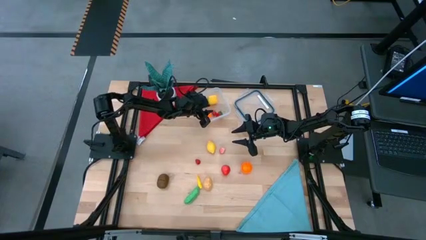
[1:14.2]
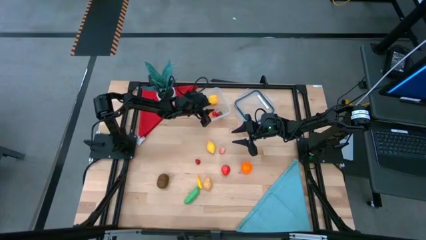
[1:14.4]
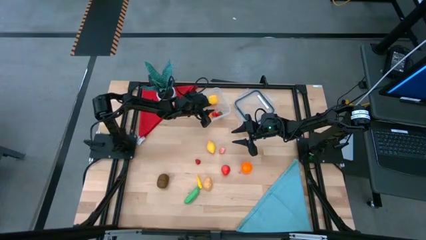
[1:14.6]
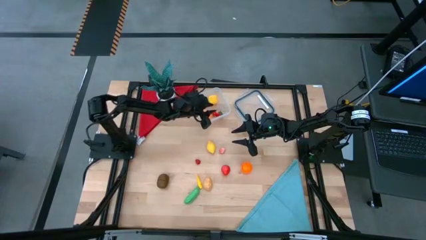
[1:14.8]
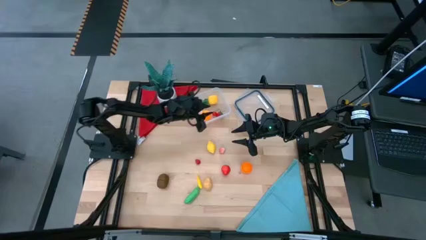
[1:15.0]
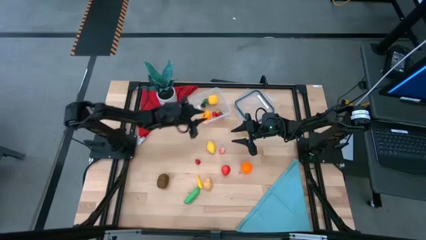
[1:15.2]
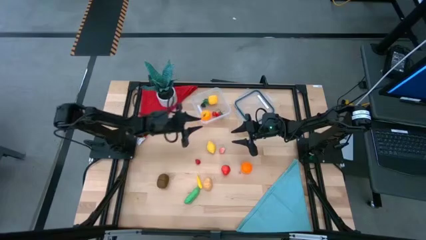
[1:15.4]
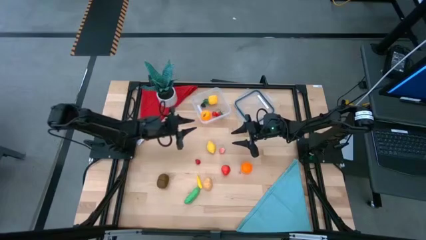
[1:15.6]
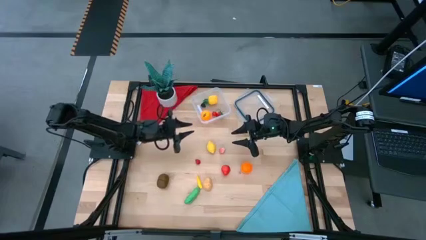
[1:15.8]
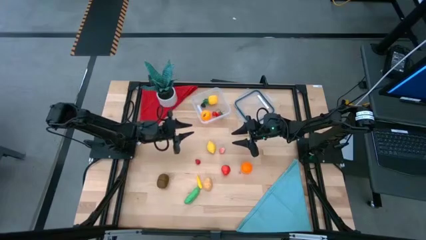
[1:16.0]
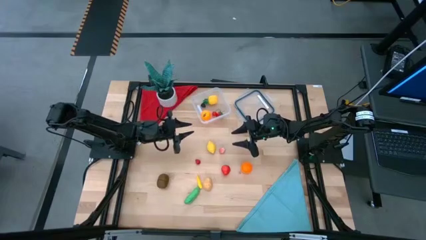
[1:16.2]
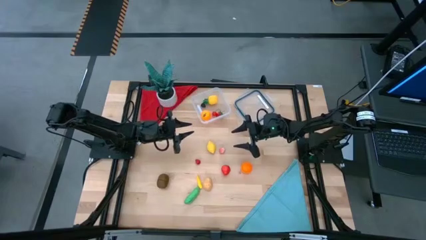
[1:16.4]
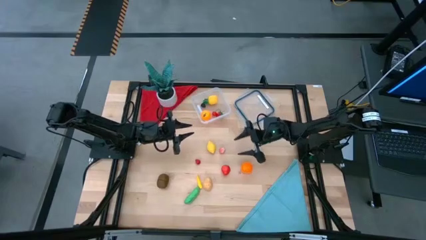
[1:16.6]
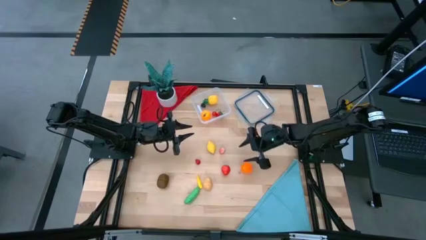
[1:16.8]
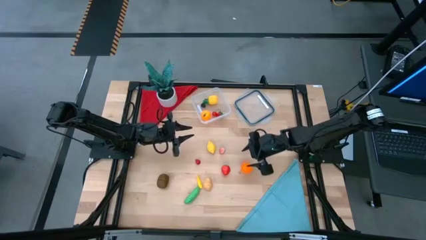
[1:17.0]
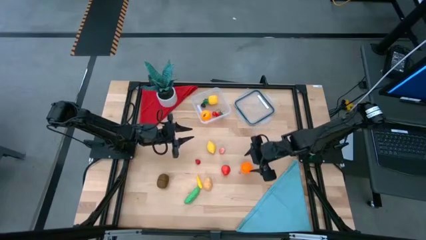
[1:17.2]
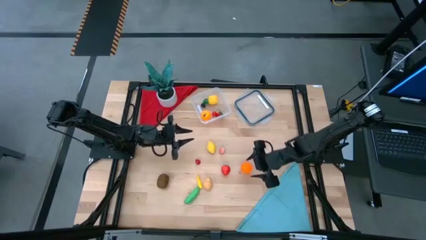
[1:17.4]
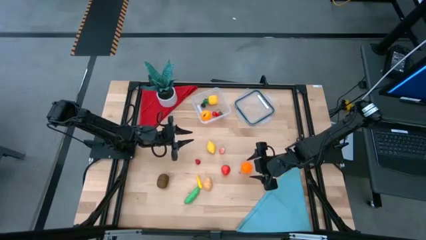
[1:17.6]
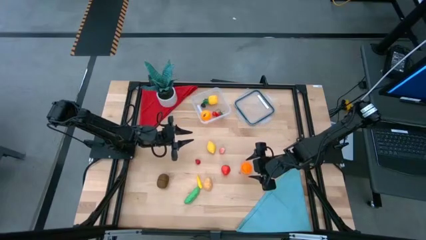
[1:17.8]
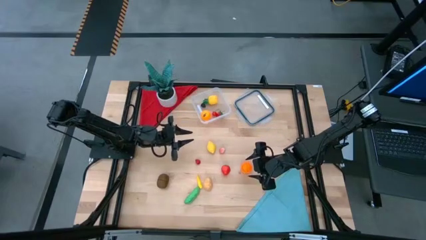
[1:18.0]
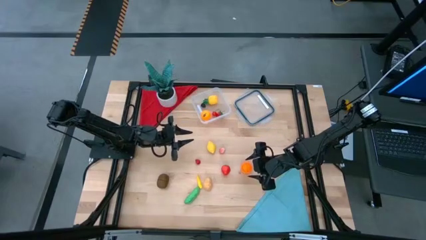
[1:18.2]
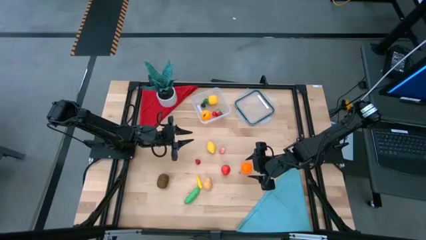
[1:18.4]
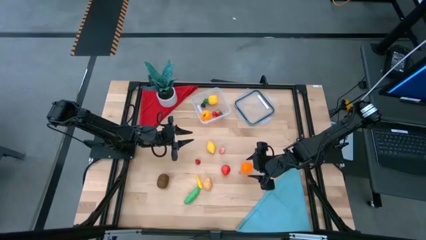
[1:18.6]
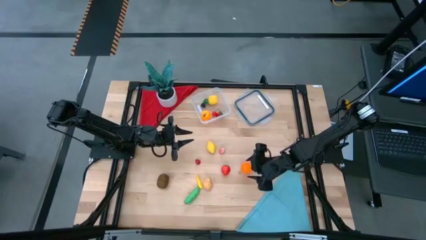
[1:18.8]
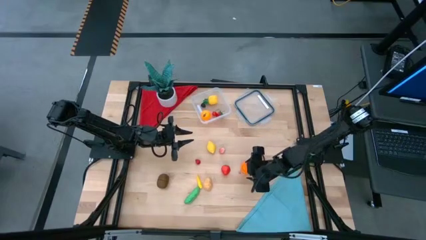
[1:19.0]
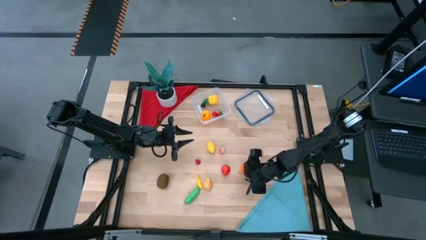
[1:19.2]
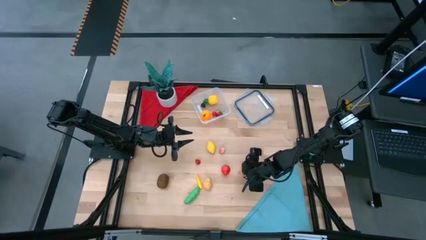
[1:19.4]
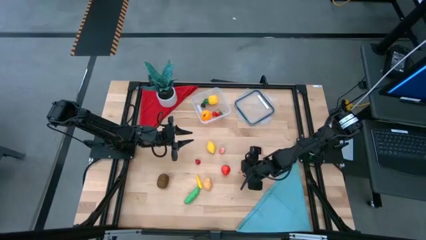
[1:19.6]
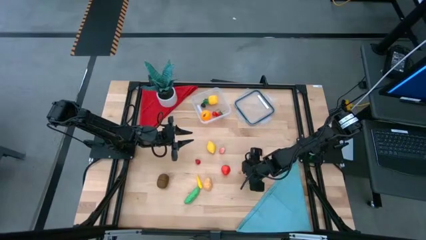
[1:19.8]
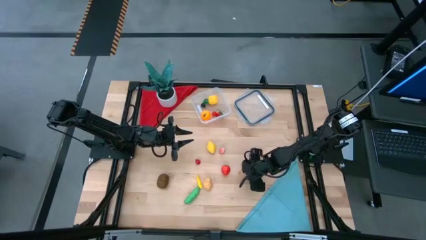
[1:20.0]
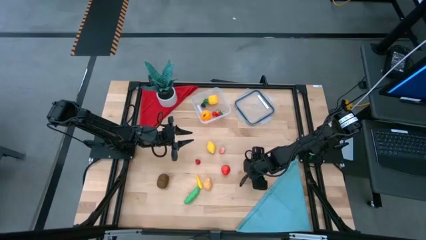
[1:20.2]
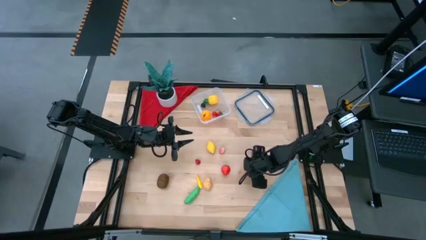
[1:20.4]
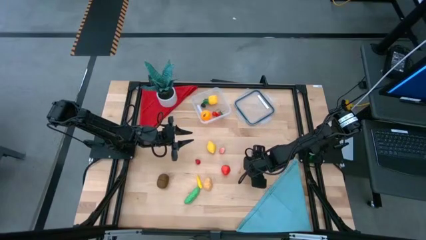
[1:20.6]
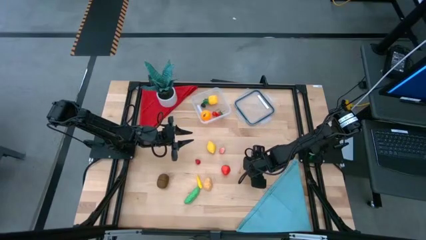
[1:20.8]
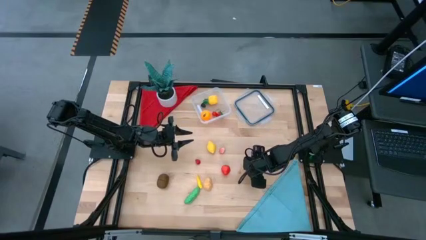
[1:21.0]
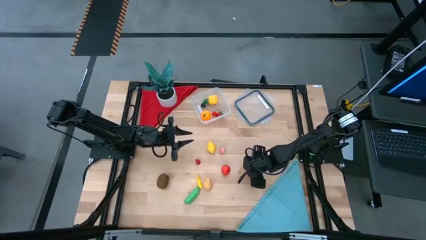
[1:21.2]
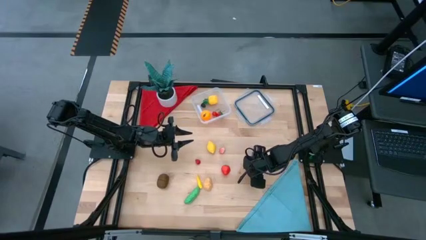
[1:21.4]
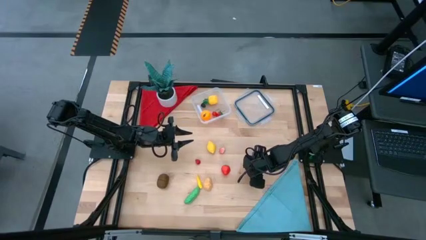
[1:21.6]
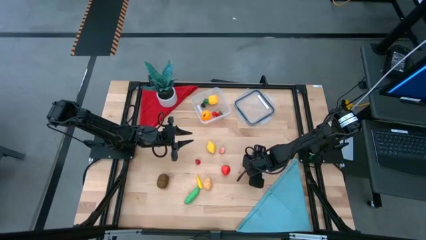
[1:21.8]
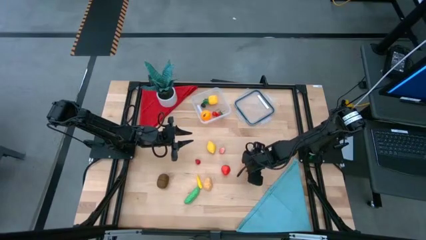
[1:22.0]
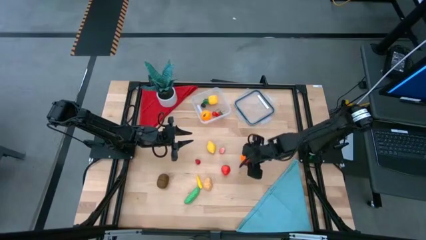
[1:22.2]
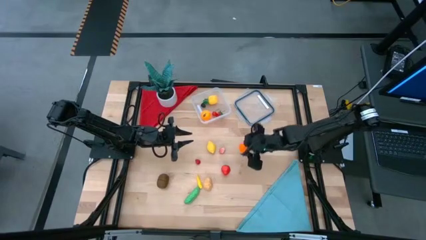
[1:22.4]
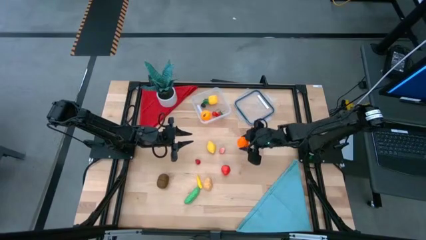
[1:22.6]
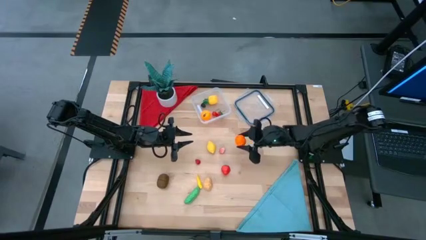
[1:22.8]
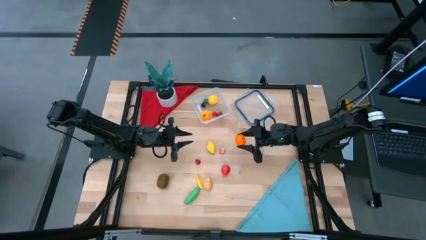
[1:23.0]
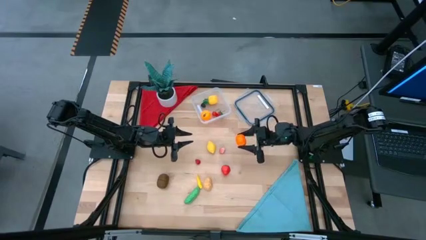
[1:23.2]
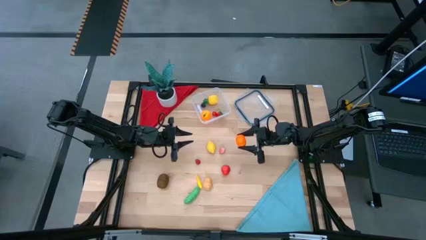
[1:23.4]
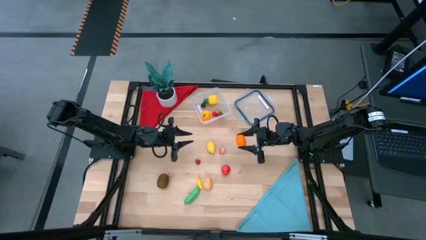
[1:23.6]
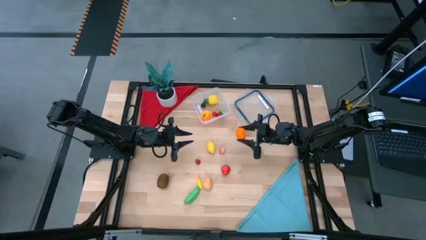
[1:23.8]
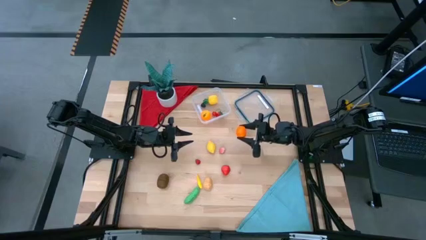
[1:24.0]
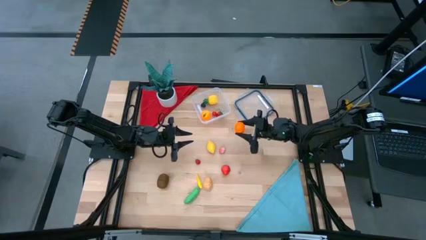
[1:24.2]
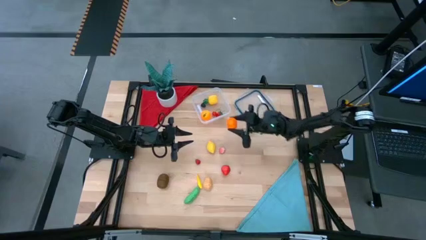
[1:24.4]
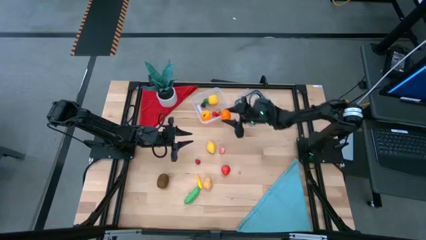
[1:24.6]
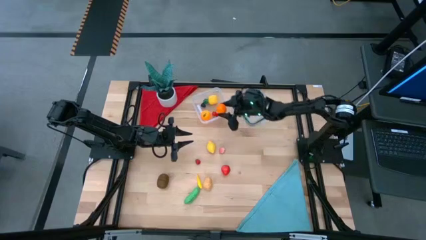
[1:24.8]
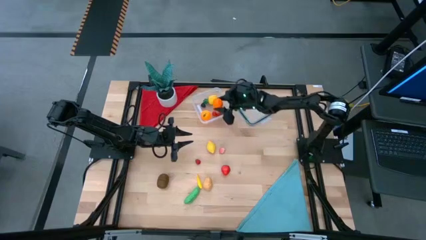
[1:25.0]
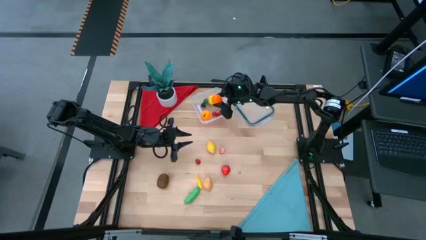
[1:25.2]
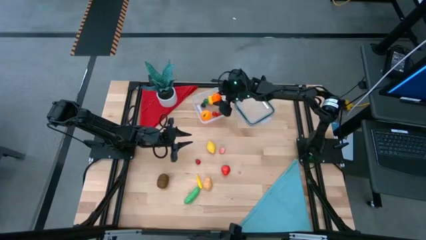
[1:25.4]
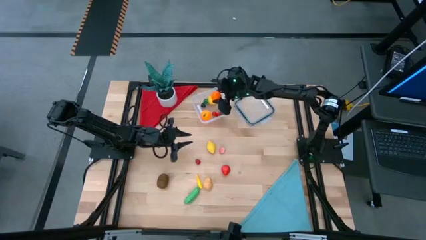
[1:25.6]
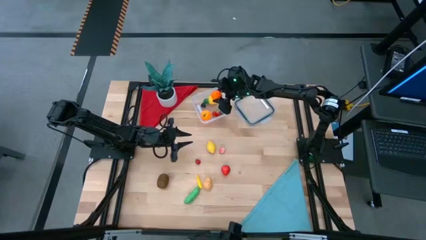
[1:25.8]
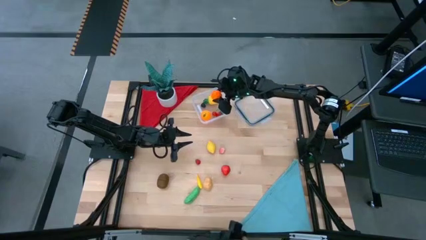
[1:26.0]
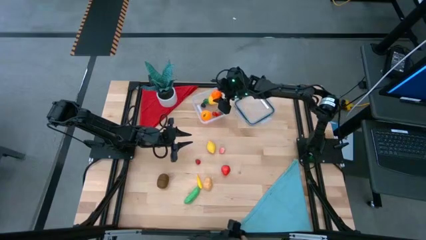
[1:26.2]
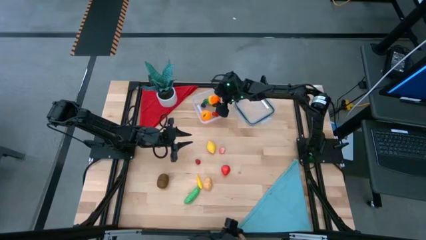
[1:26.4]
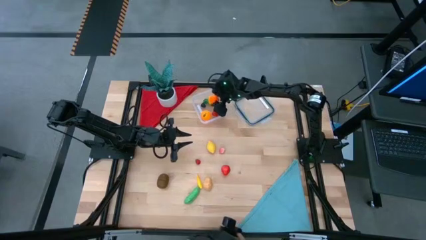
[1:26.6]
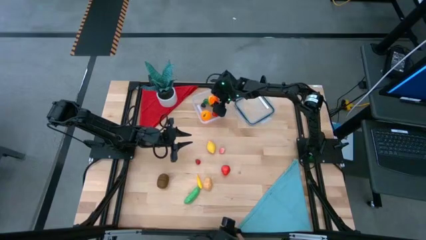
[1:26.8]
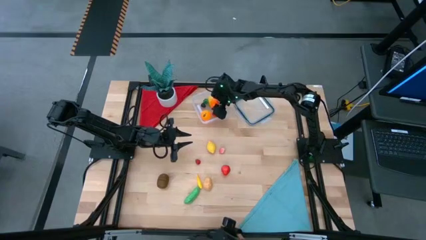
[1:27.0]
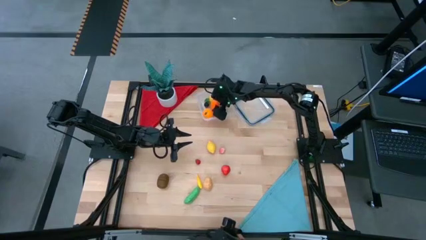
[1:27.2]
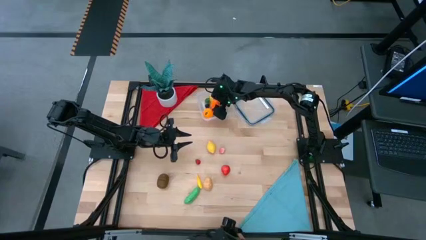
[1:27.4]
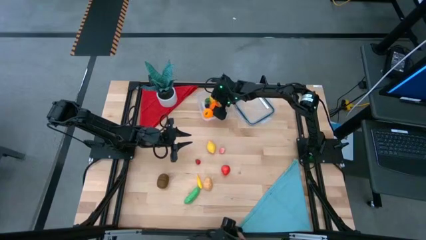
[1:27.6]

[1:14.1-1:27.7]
Task: Pick and placing Produce into tupperware
Put the orange pumpkin into the transparent container

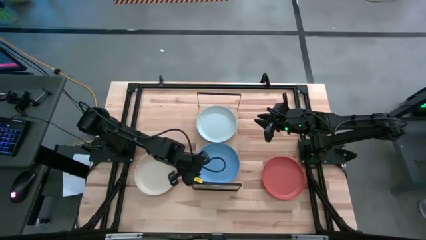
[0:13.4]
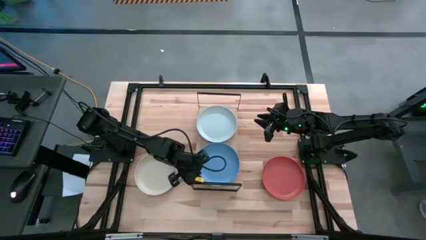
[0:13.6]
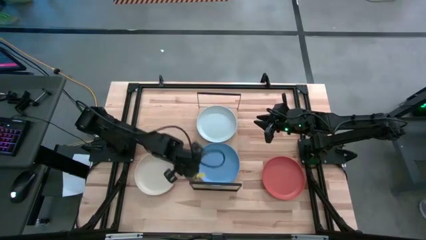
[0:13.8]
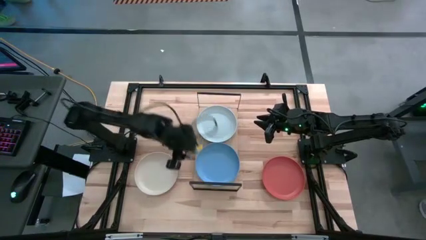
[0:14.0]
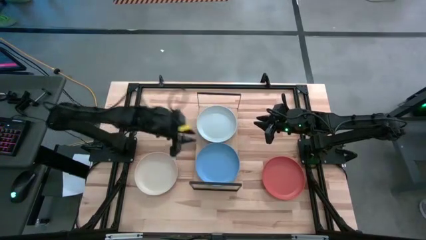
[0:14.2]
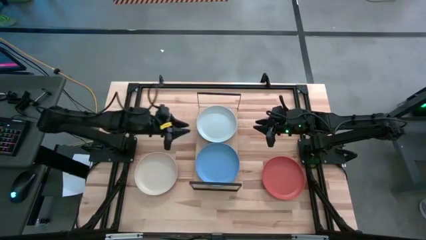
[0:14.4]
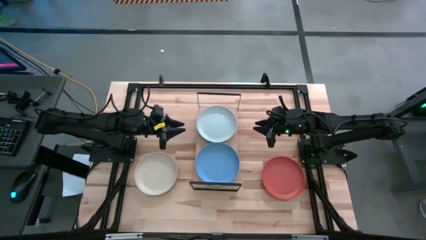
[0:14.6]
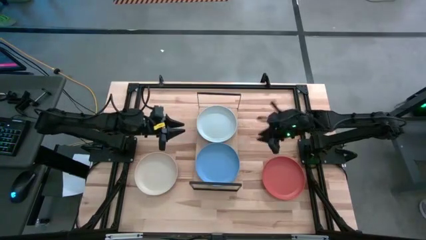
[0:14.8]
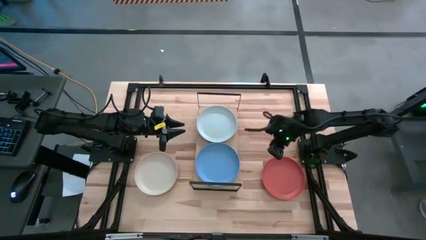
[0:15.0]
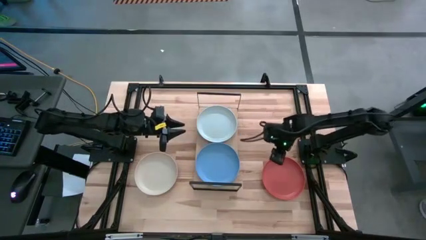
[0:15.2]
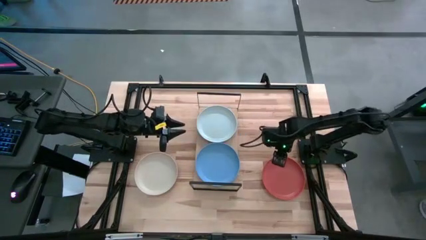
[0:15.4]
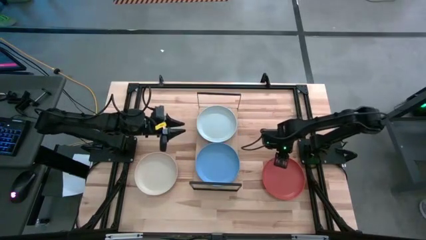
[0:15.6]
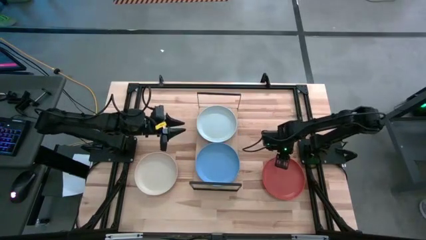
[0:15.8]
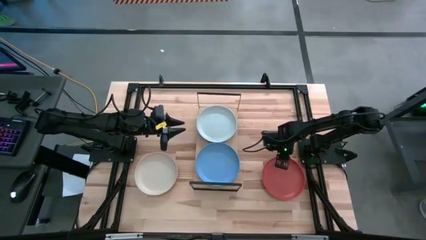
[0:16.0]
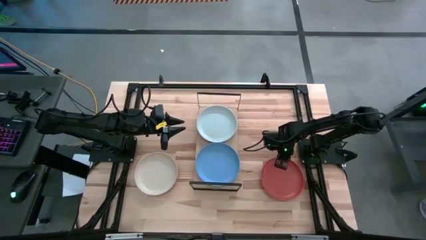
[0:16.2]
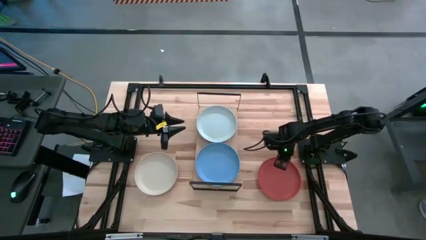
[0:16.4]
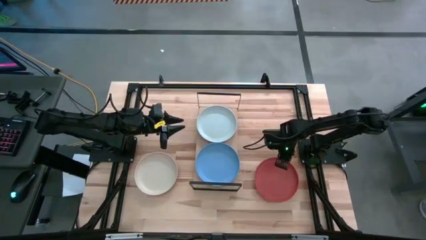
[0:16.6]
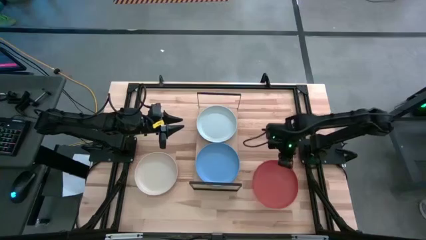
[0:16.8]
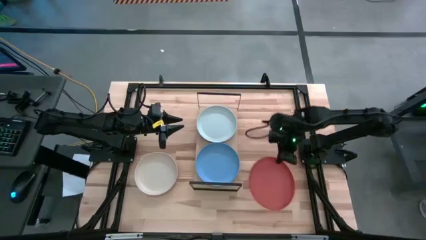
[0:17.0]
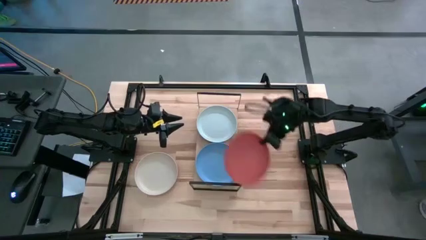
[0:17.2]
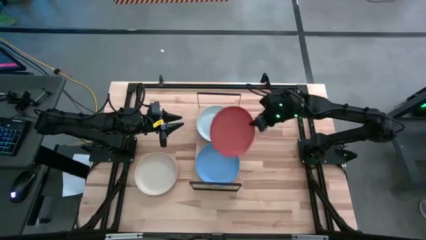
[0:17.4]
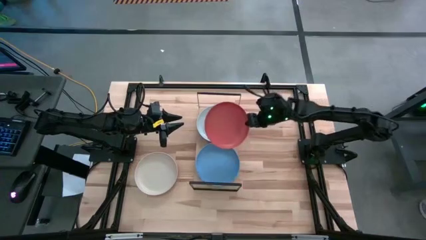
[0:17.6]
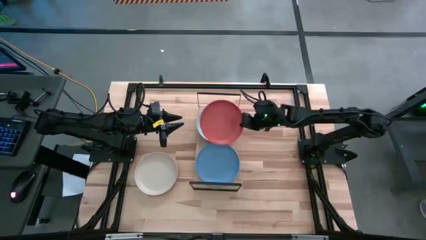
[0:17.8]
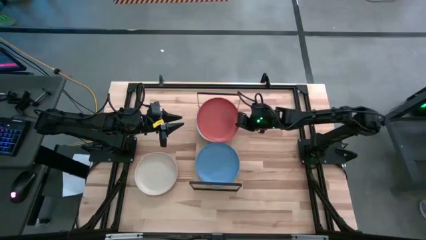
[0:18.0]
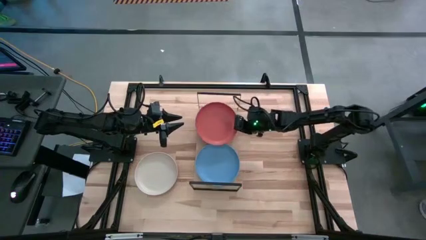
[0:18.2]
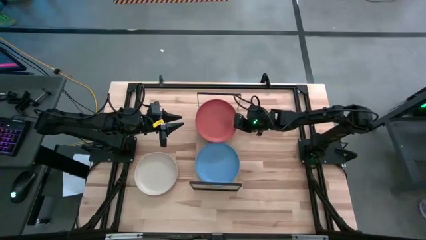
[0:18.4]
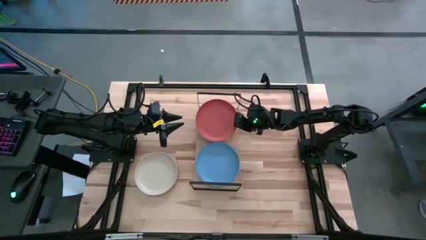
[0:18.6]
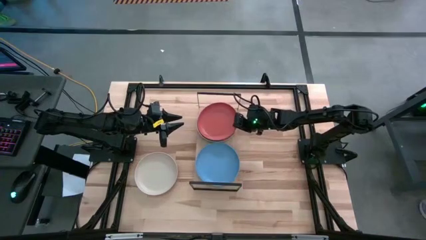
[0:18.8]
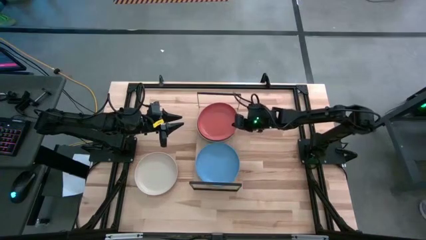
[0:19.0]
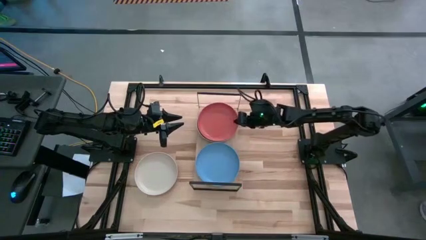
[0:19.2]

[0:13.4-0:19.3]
Task: Place and stack plates onto a shelf
Stack the orange plate on top of the white plate on the shelf
